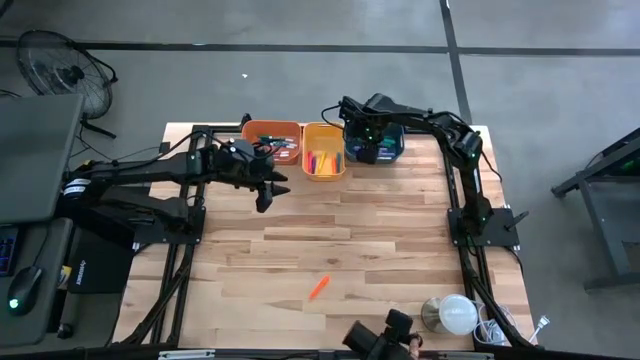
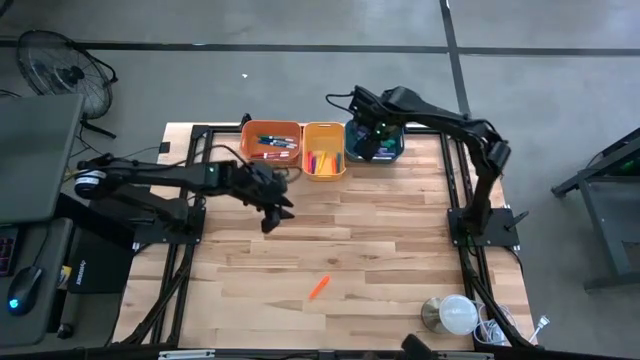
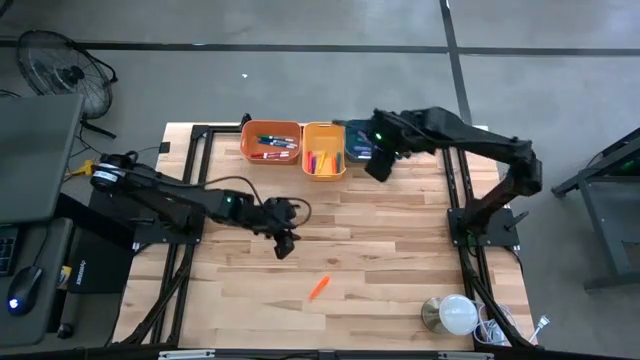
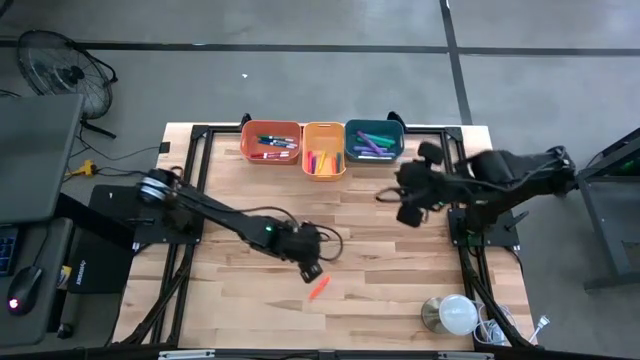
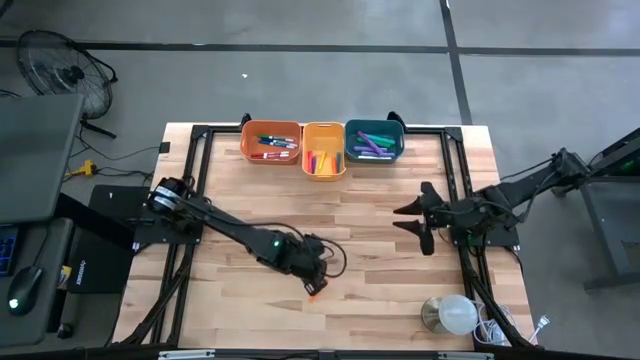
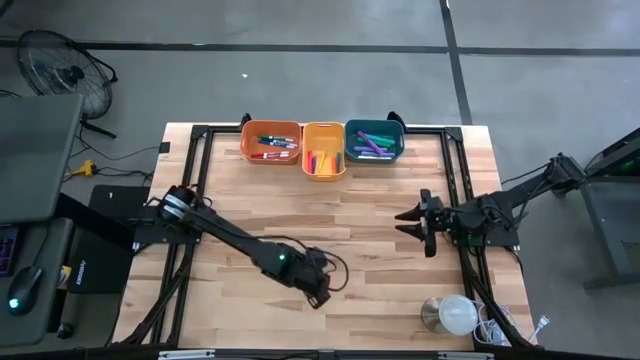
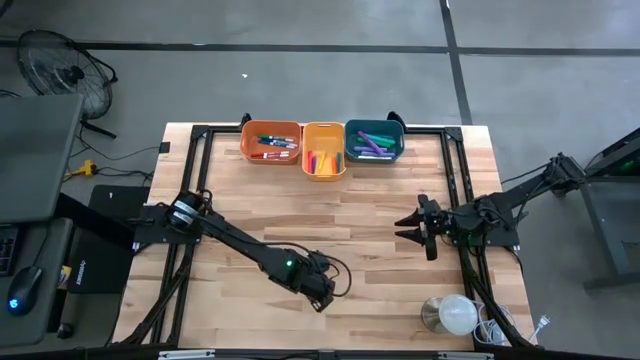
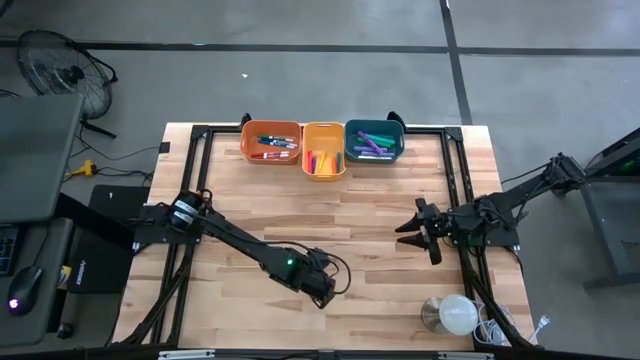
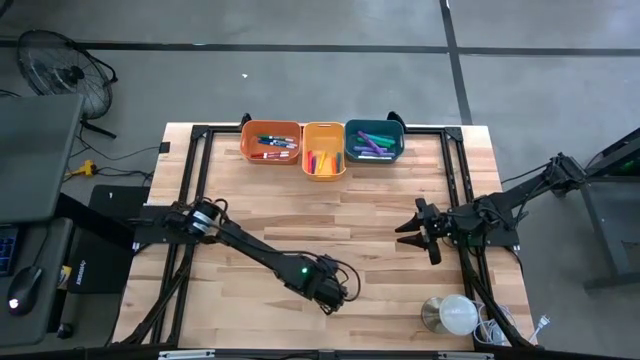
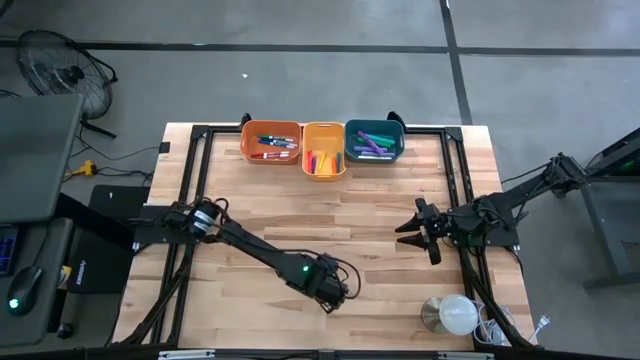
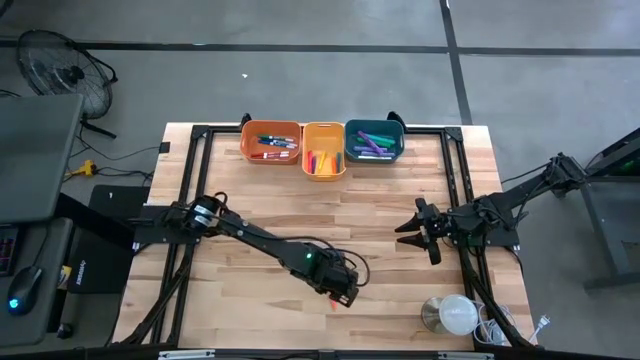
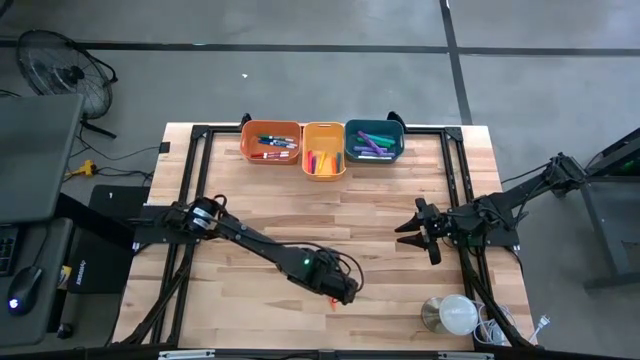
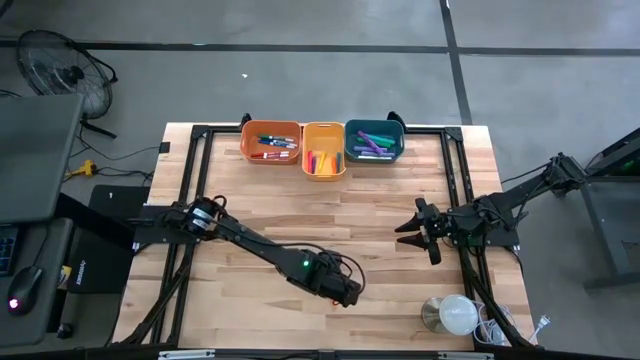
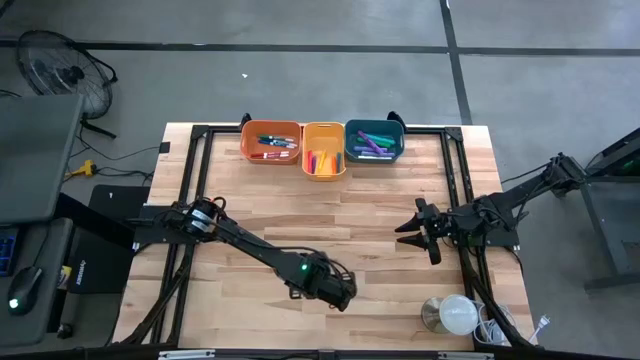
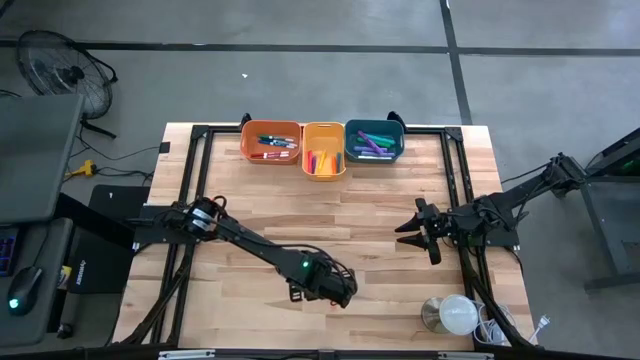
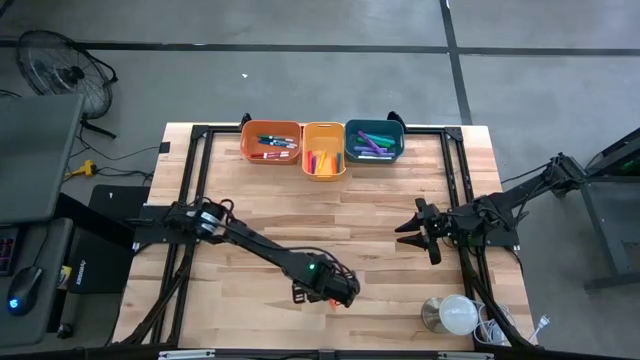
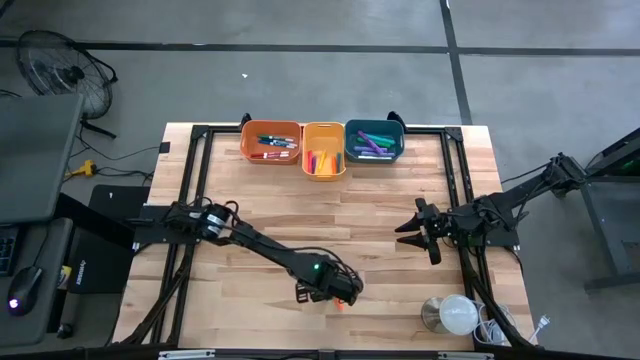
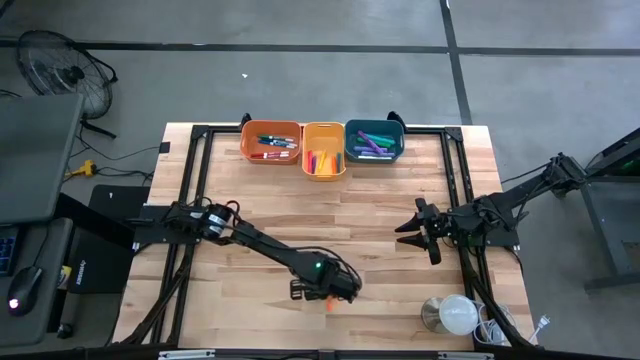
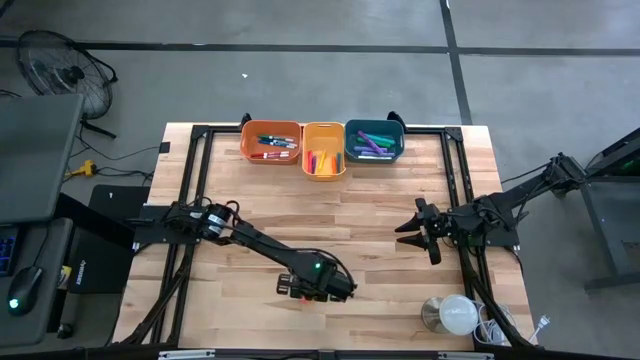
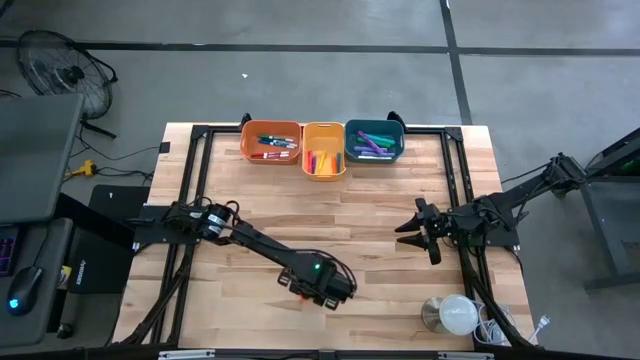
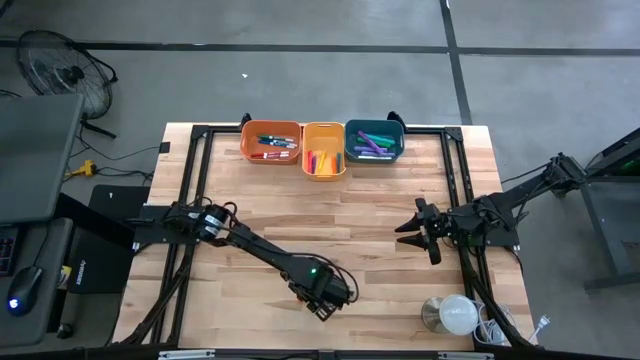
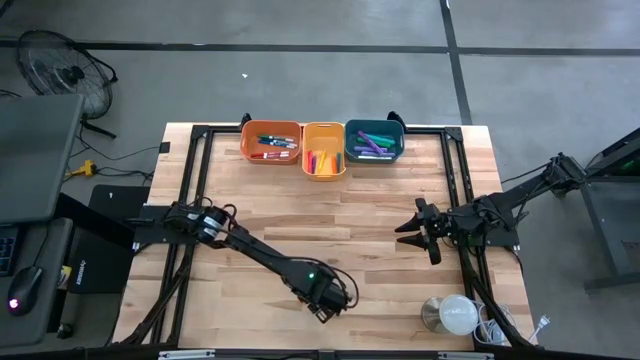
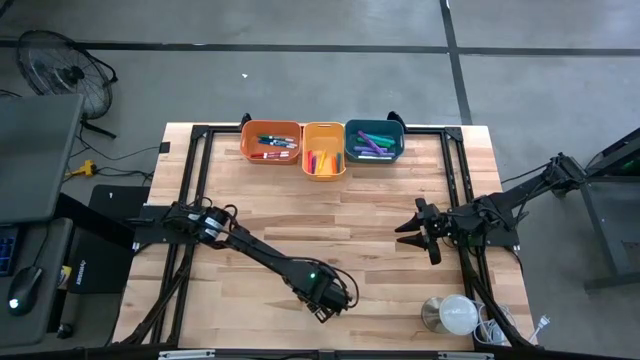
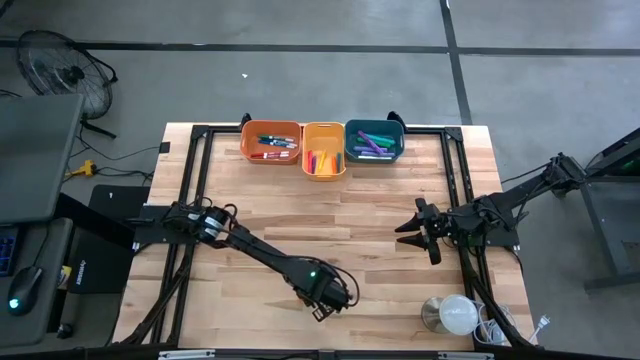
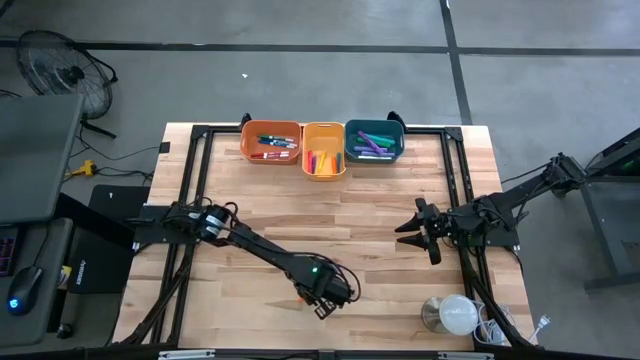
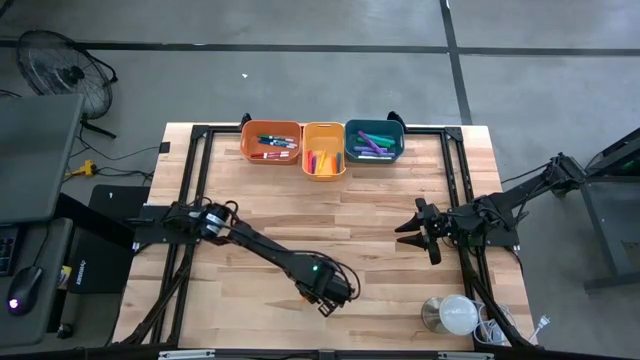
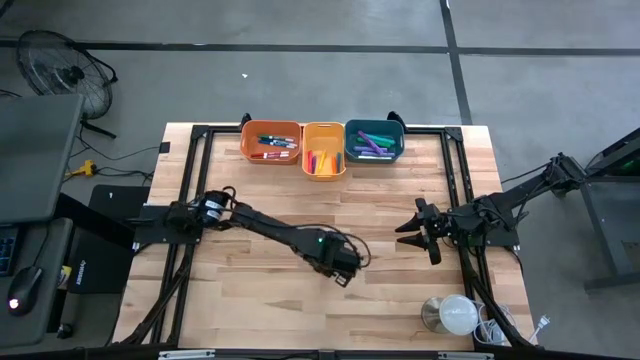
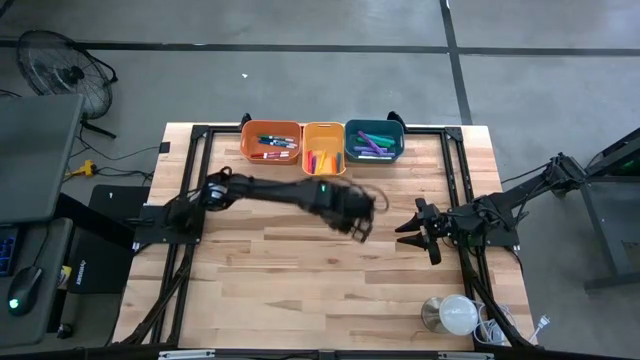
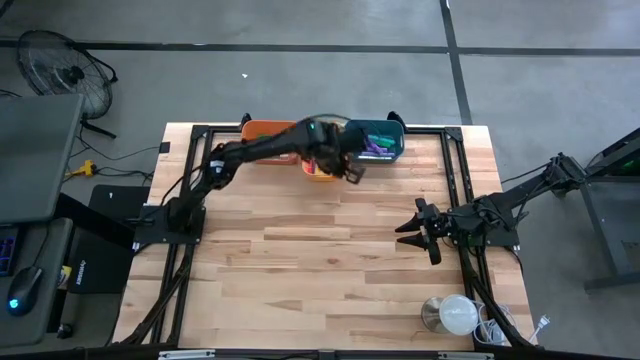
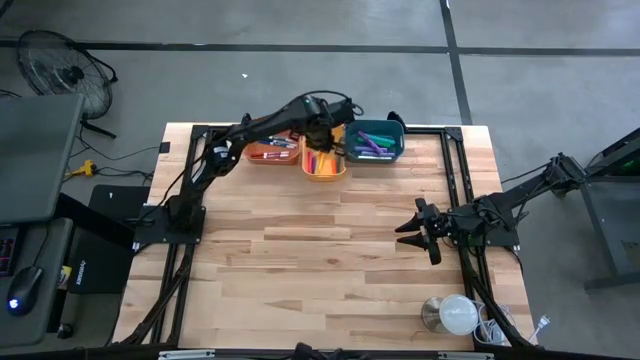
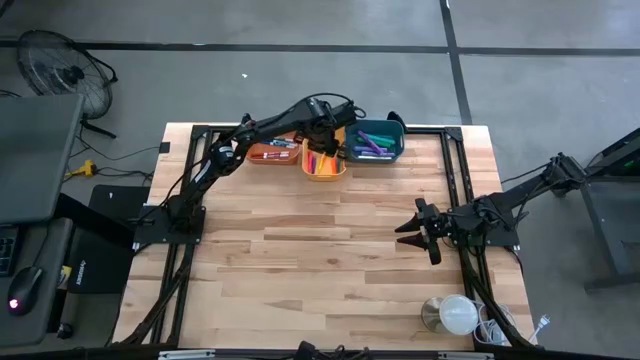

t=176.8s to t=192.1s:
Task: Pick & Place Markers
Put the orange pen into the yellow bin

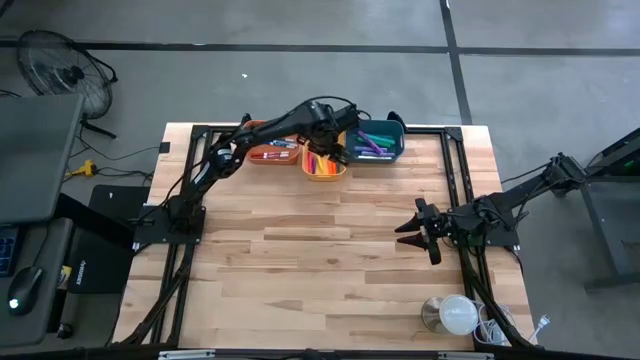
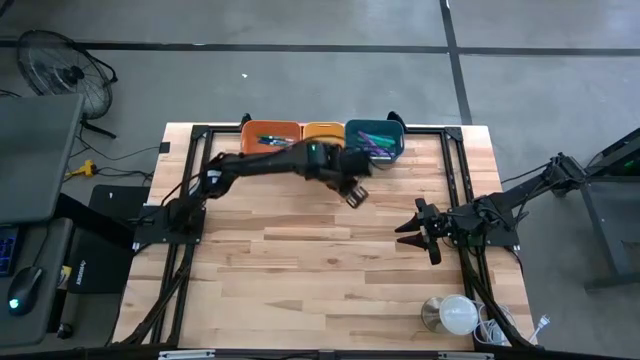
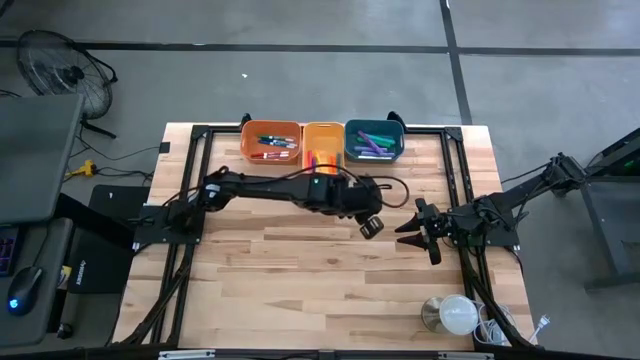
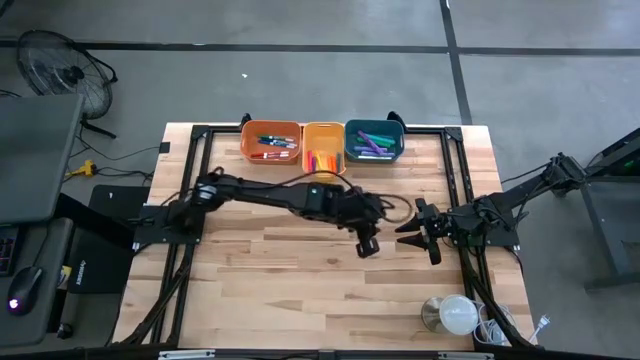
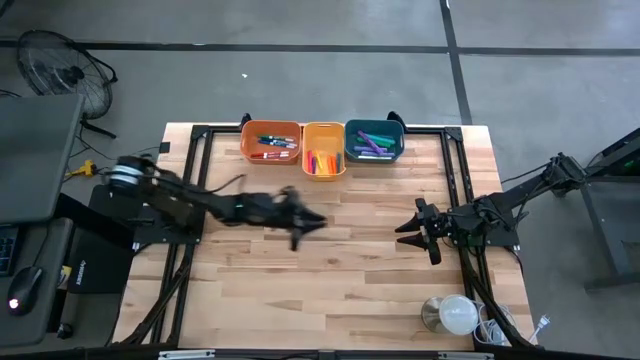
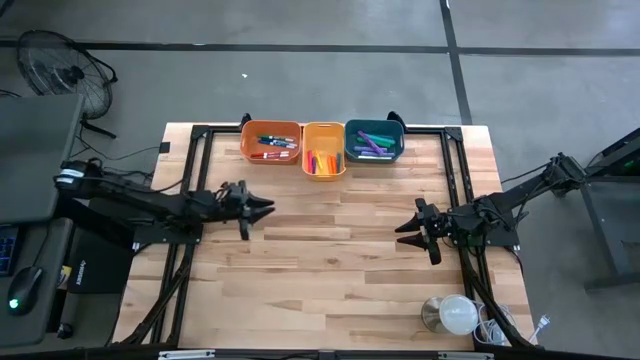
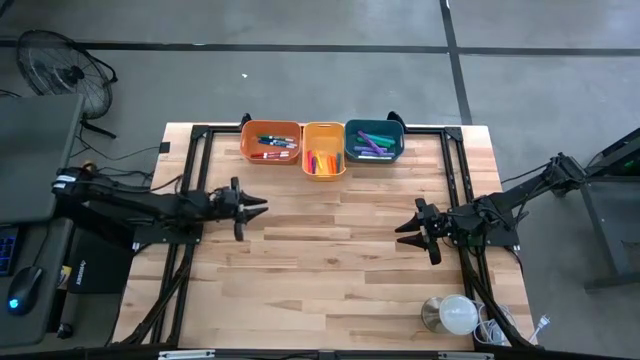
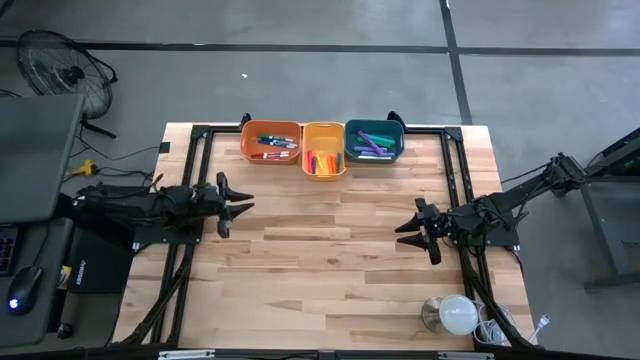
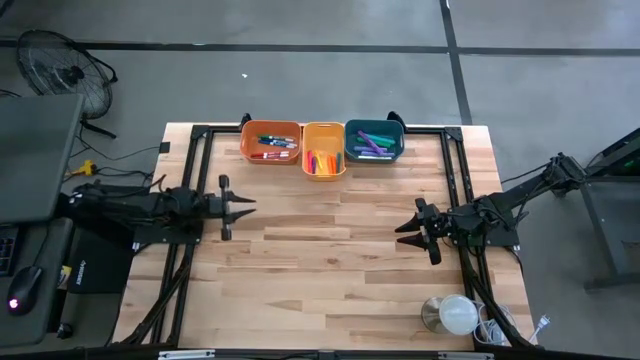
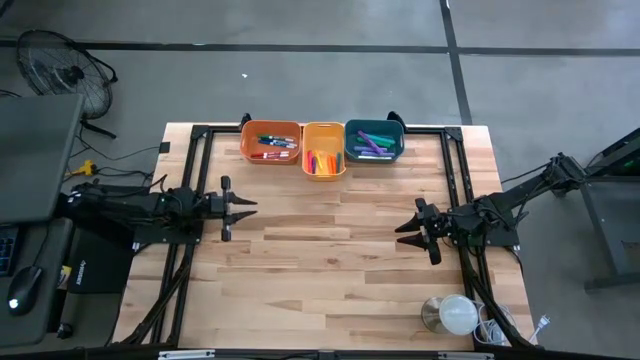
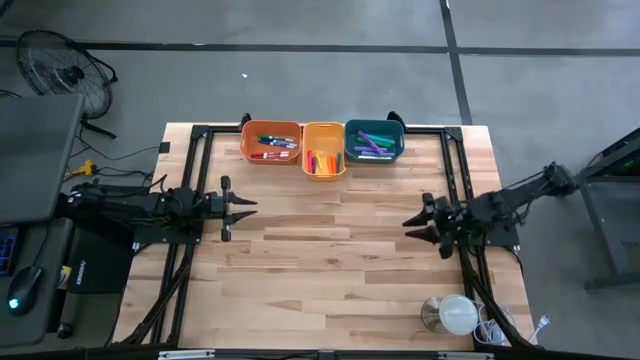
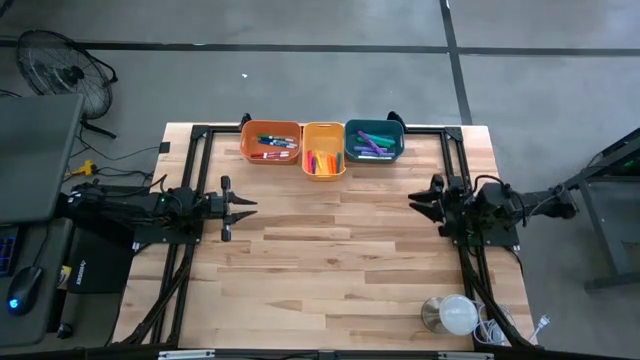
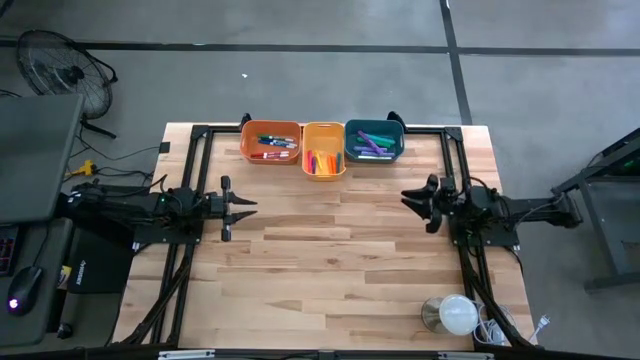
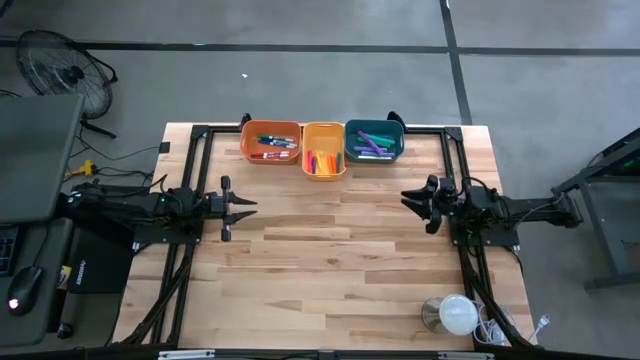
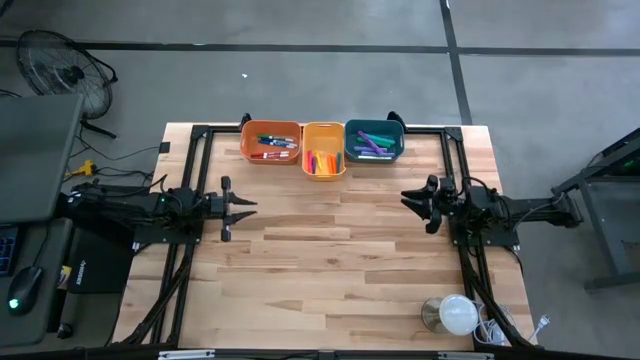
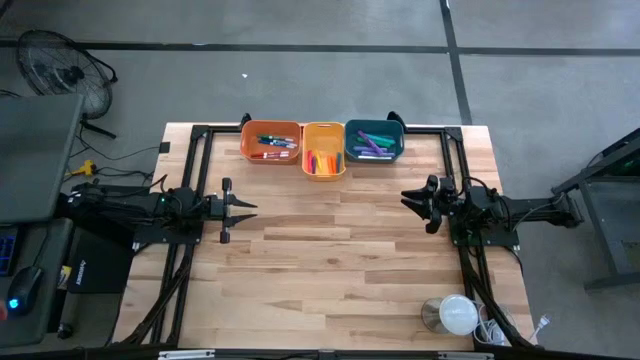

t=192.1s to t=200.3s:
Return to Home Position
